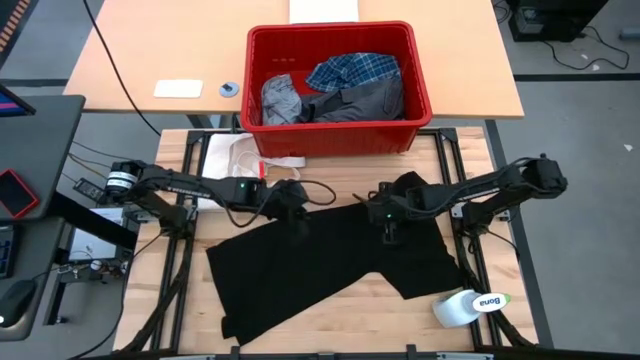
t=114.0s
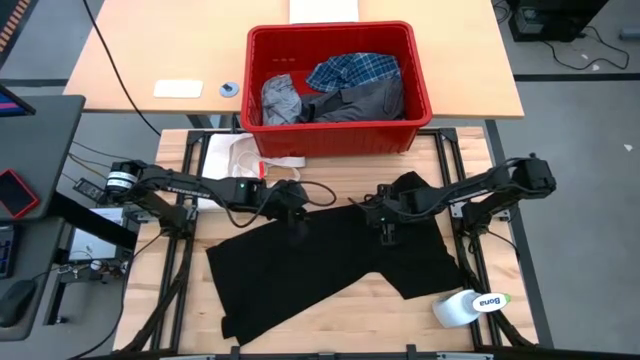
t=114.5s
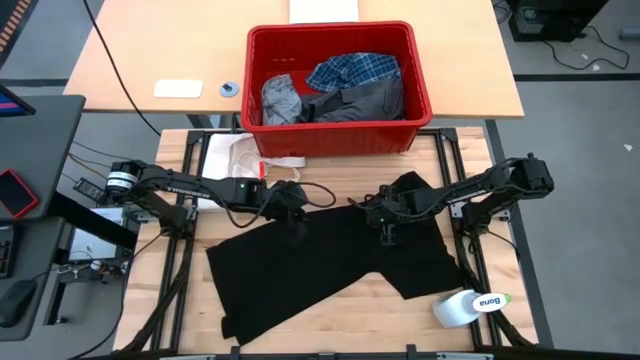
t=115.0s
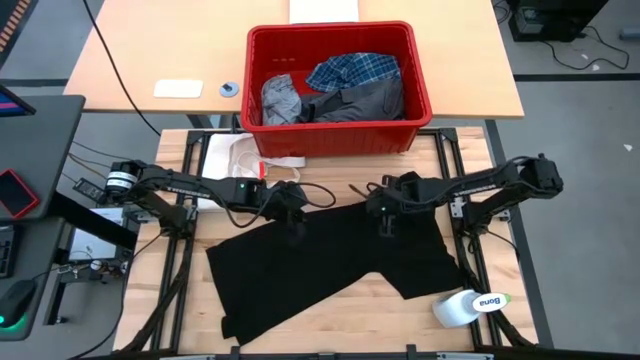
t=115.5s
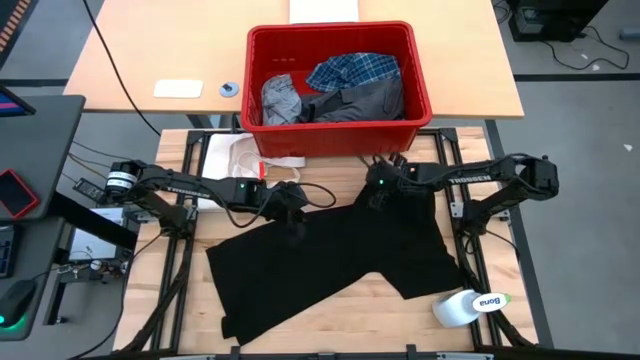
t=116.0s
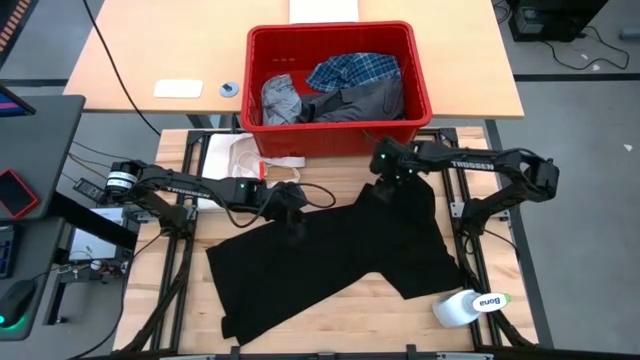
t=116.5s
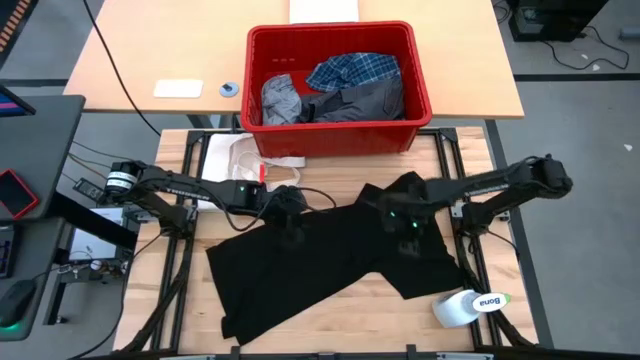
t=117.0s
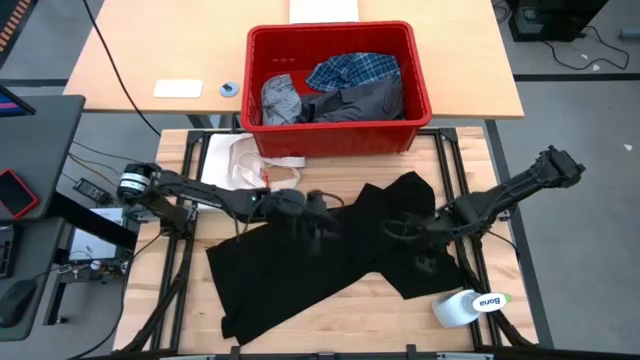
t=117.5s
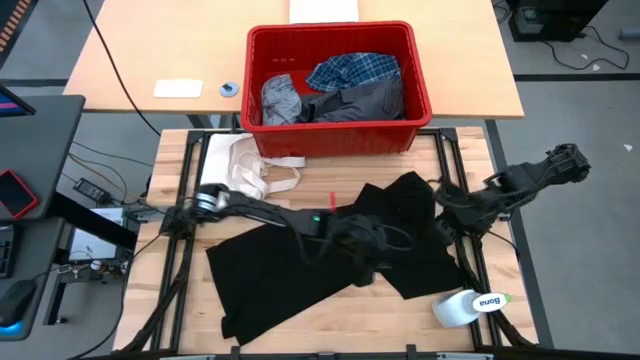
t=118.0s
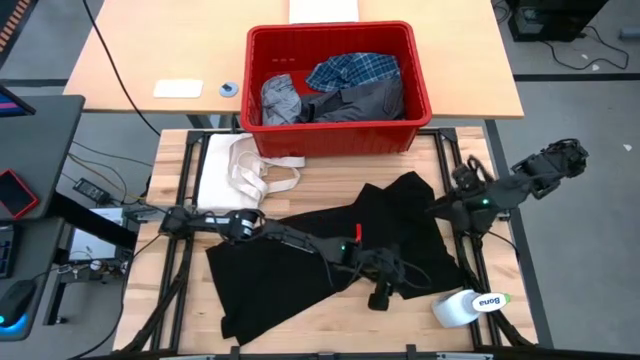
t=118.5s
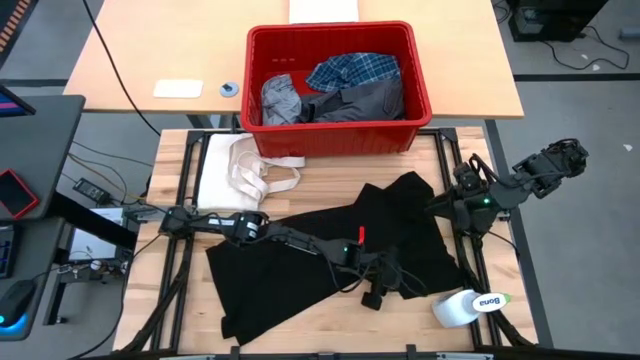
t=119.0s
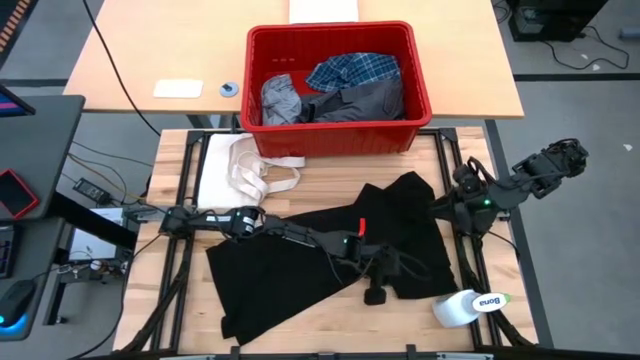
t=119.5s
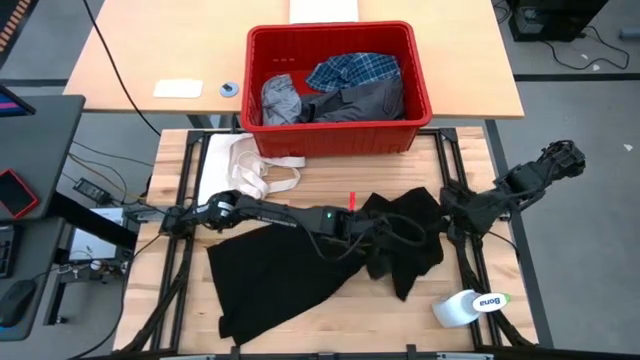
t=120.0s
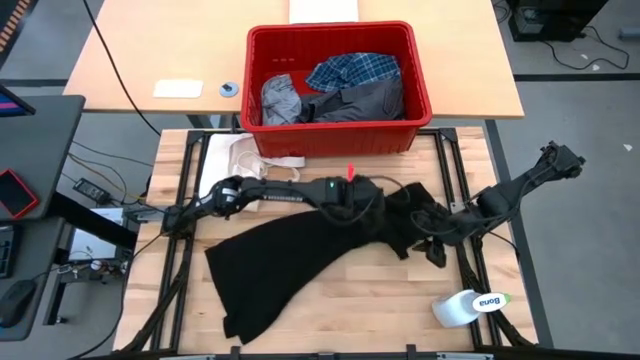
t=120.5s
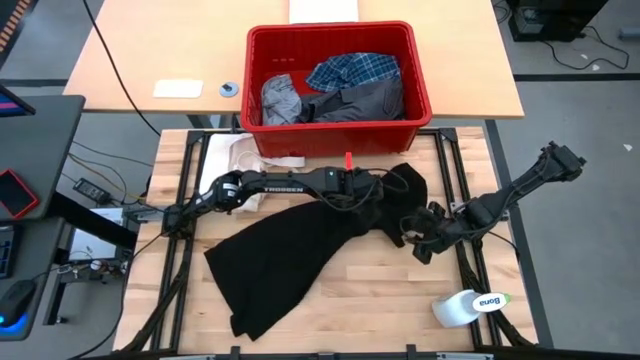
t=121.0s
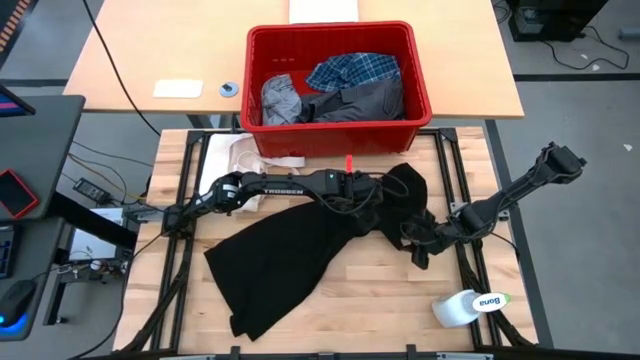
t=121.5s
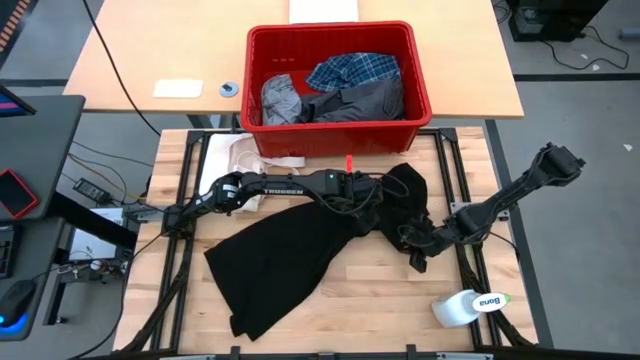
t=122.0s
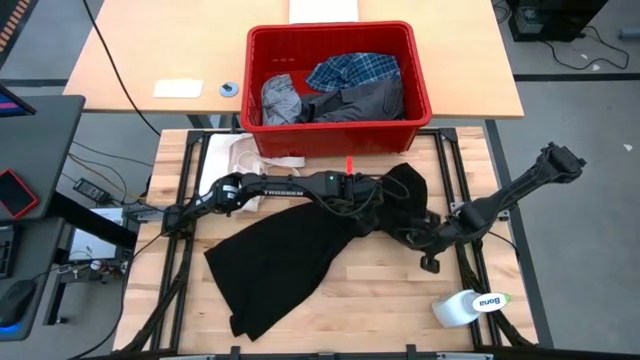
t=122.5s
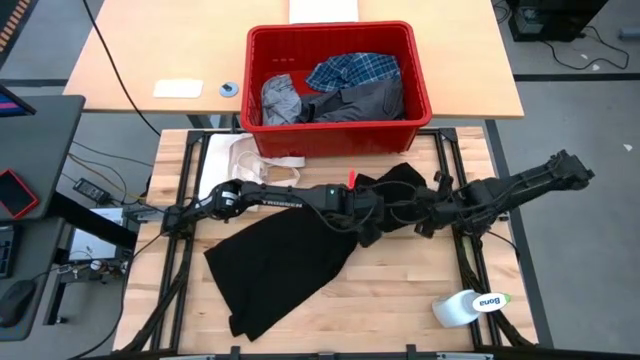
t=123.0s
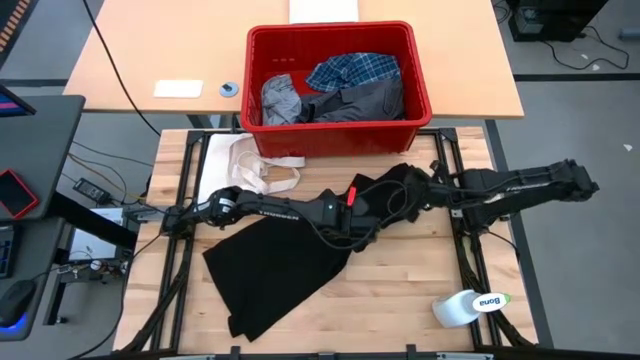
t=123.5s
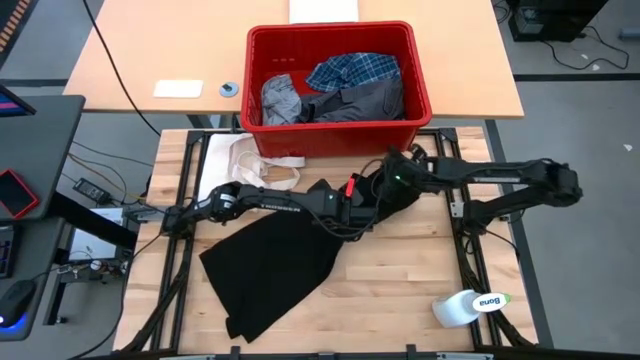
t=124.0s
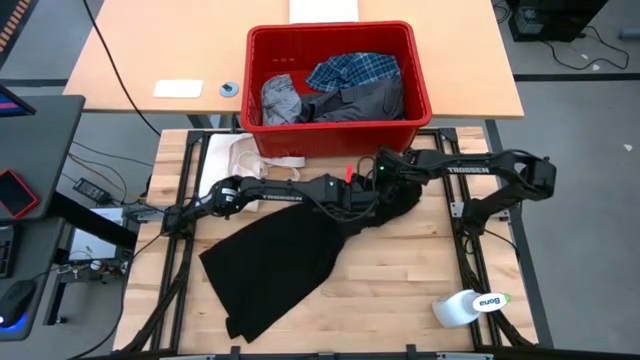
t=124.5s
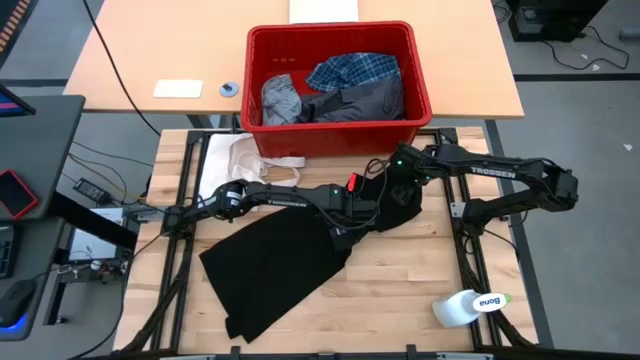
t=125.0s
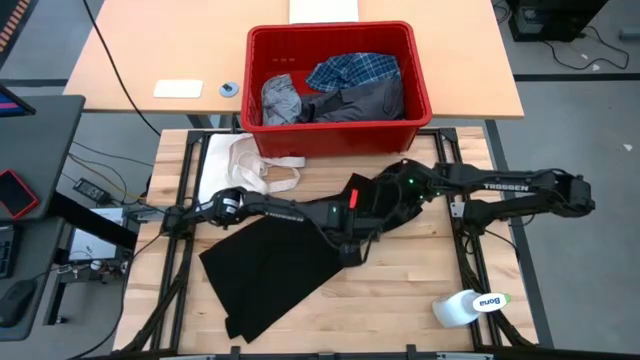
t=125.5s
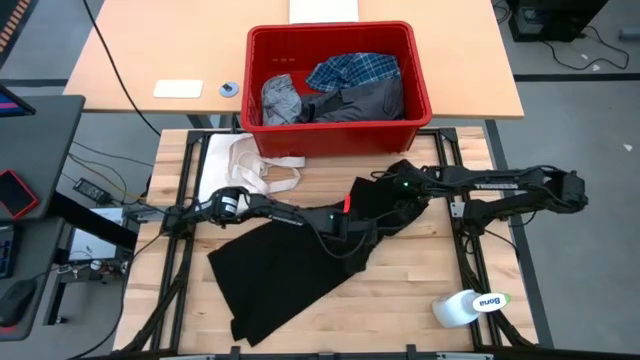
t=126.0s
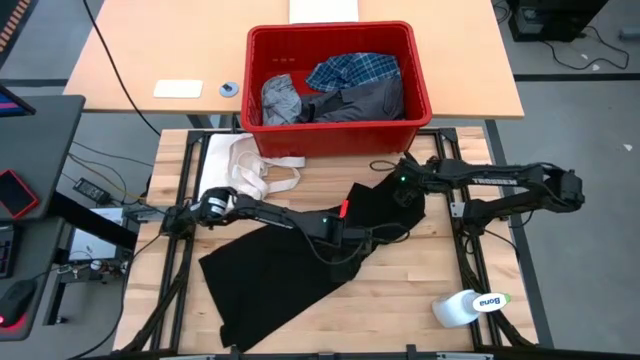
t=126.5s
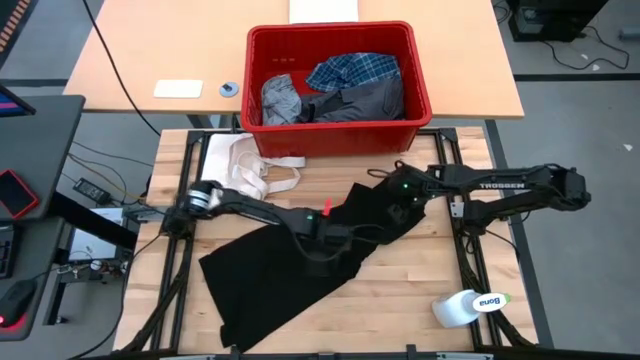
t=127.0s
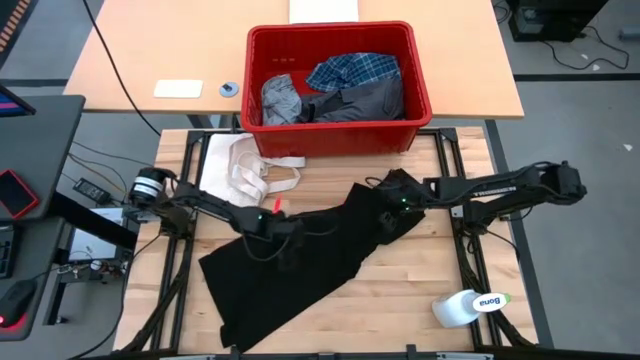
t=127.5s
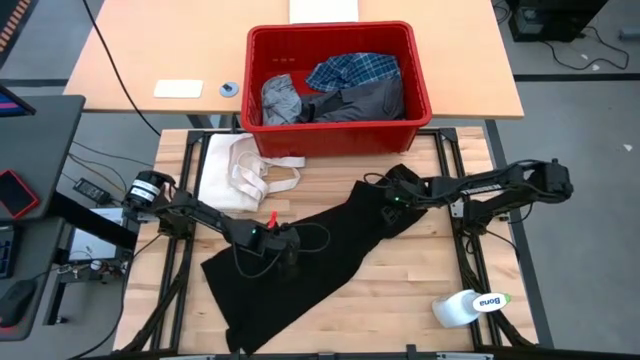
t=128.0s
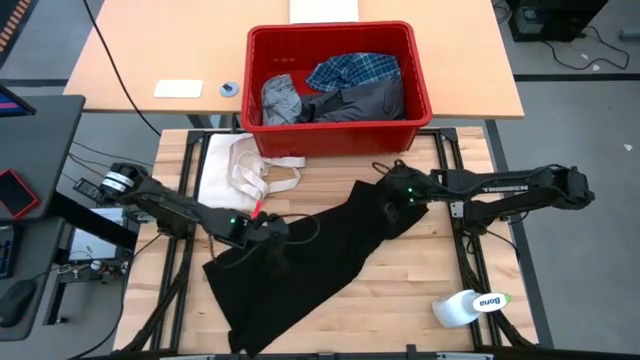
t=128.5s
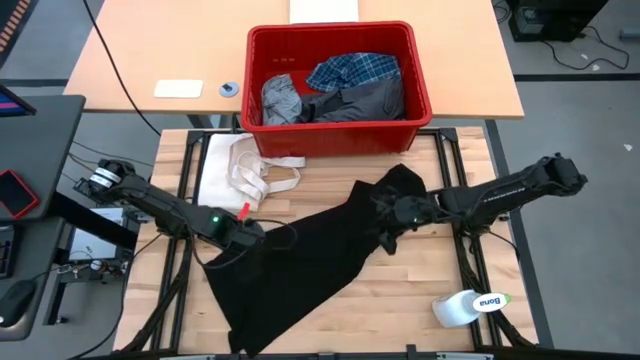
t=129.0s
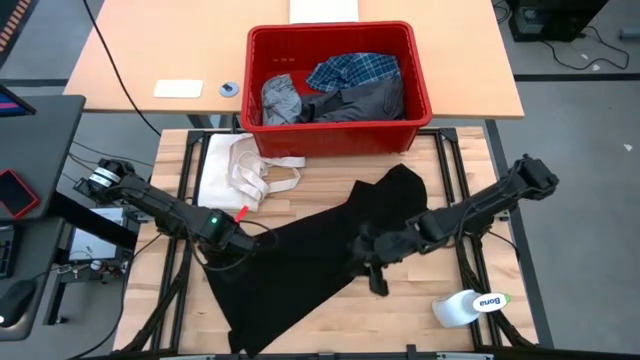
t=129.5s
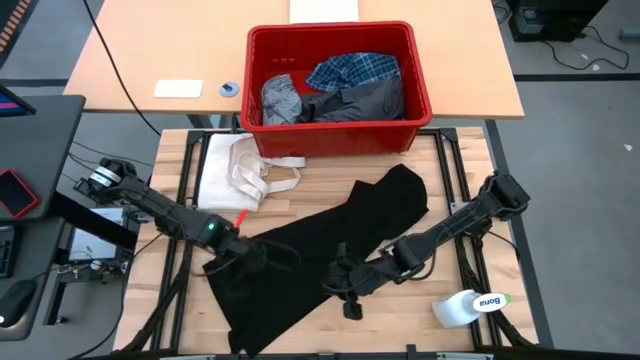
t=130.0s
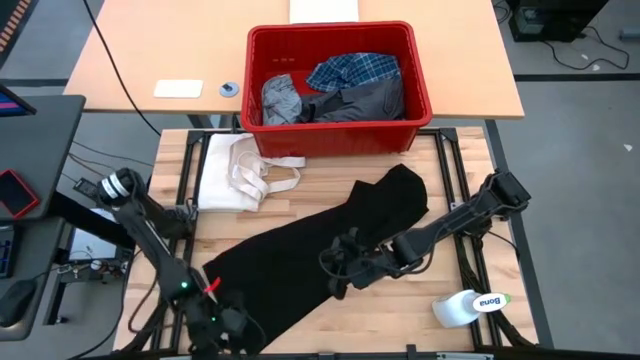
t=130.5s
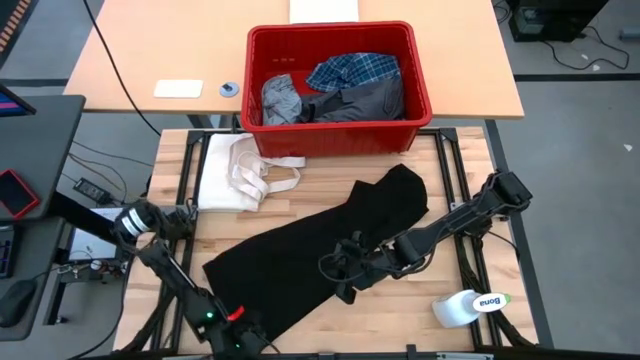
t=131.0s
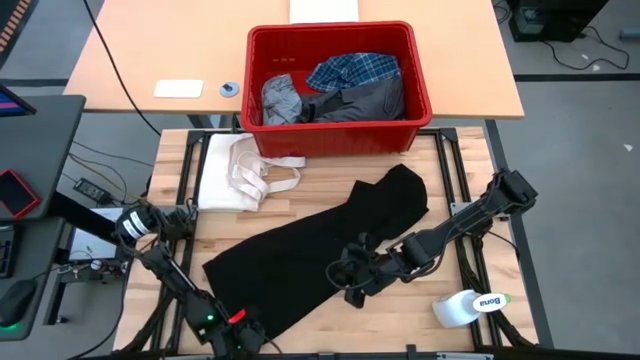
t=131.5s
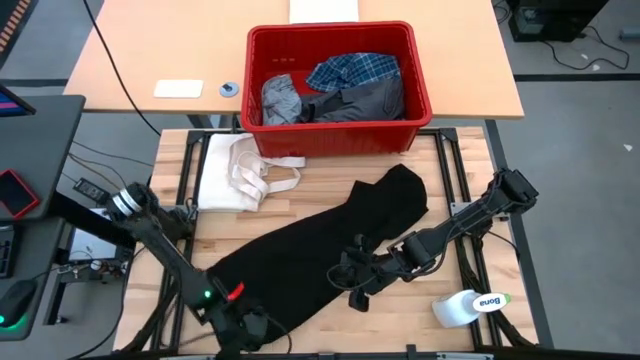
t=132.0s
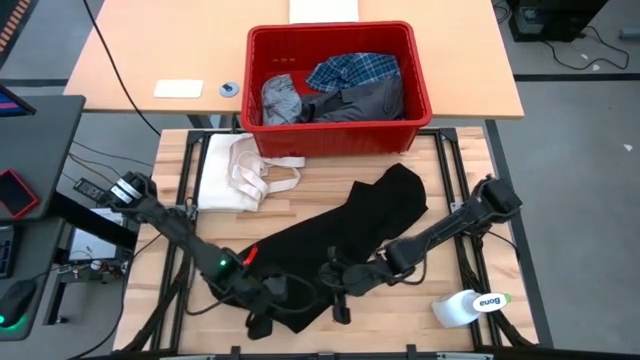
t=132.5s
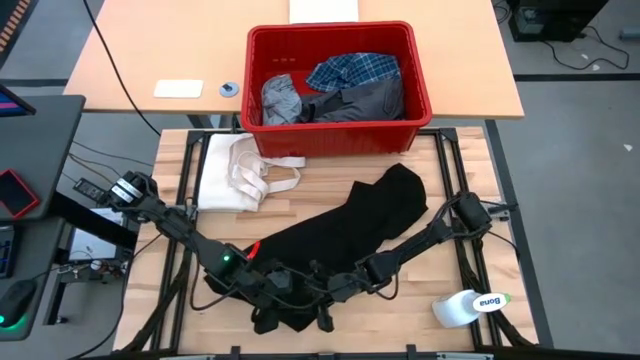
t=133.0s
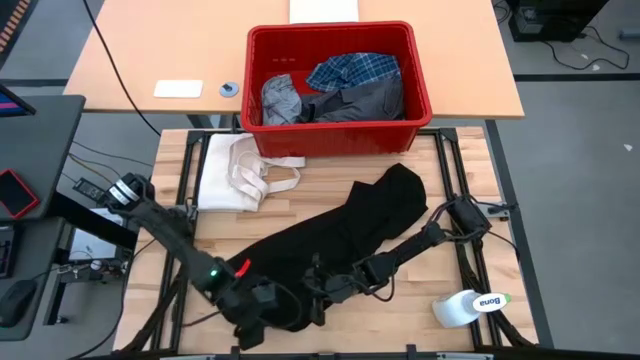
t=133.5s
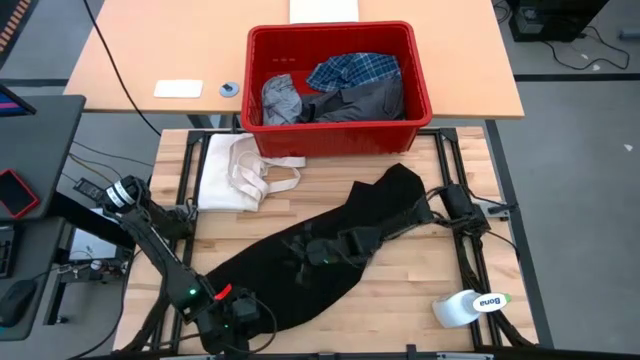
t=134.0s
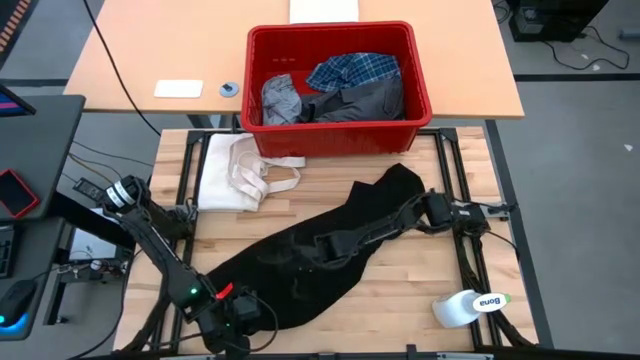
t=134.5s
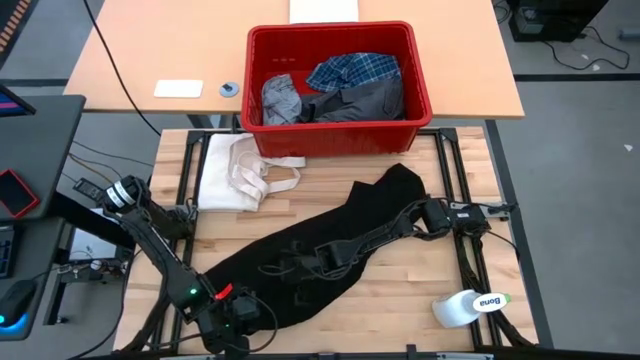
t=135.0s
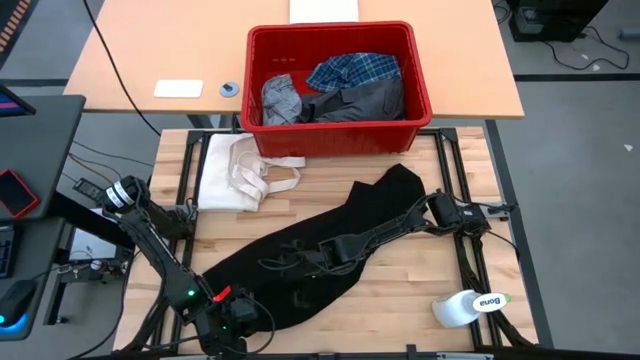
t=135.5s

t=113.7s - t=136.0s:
Task: Fold Laundry from Bin
Fold the black shirt
